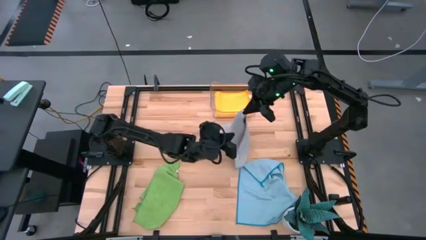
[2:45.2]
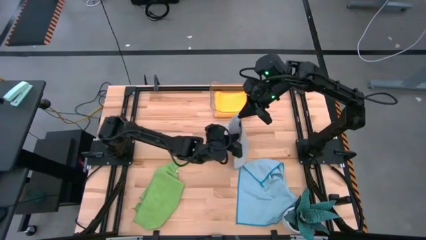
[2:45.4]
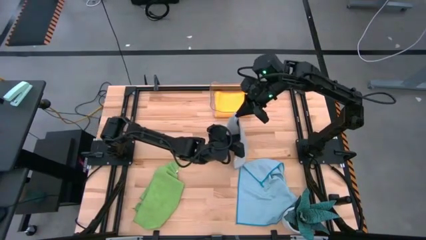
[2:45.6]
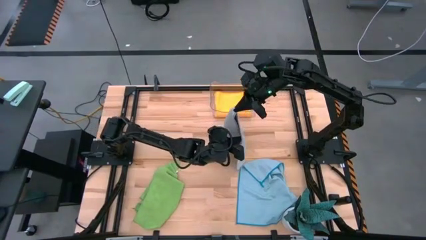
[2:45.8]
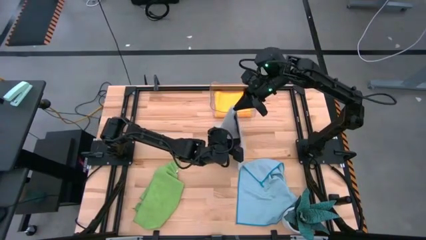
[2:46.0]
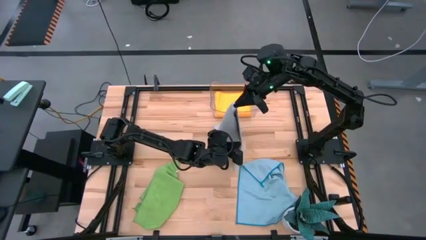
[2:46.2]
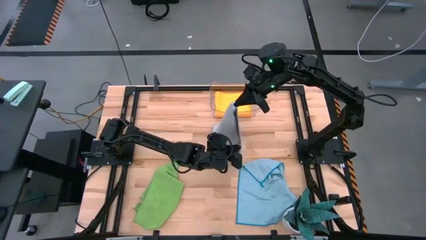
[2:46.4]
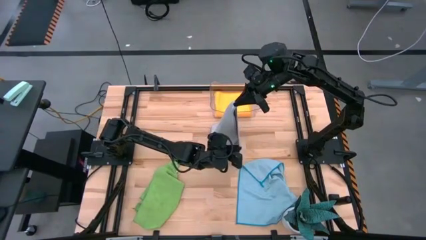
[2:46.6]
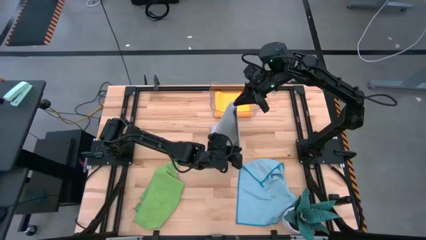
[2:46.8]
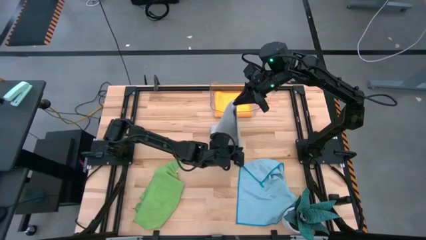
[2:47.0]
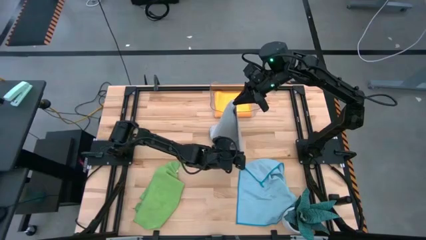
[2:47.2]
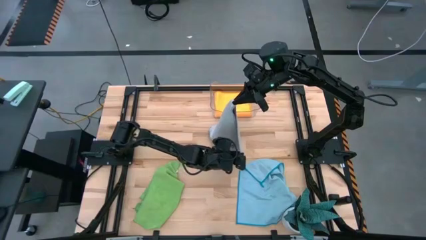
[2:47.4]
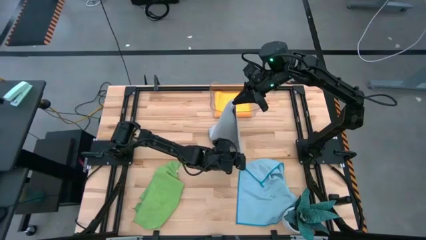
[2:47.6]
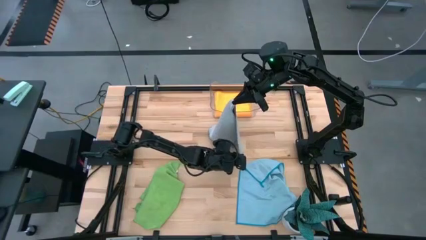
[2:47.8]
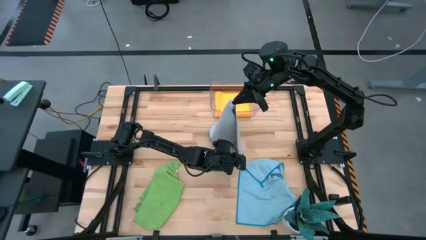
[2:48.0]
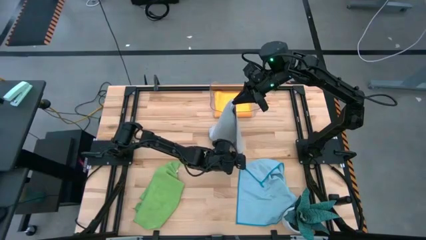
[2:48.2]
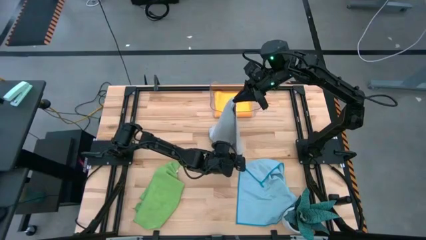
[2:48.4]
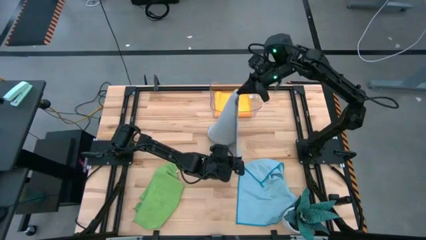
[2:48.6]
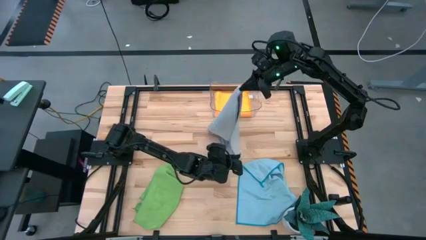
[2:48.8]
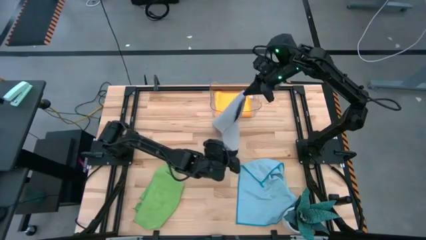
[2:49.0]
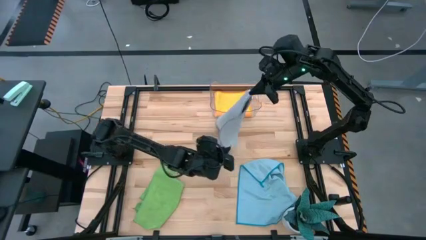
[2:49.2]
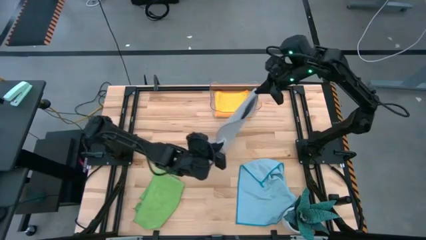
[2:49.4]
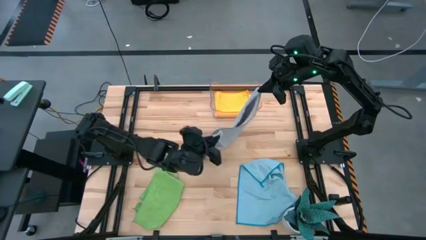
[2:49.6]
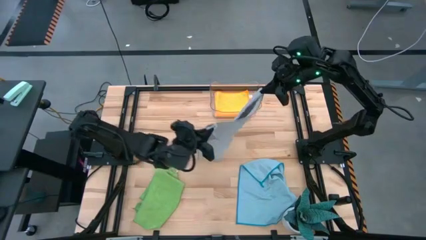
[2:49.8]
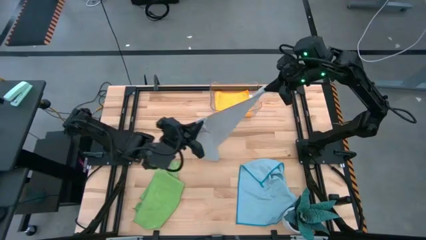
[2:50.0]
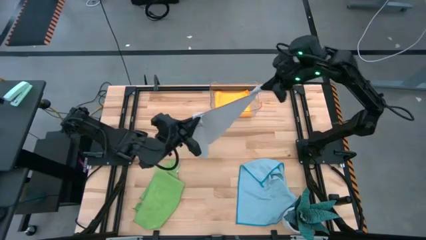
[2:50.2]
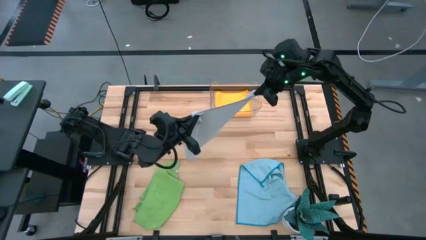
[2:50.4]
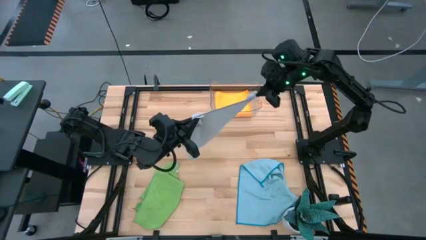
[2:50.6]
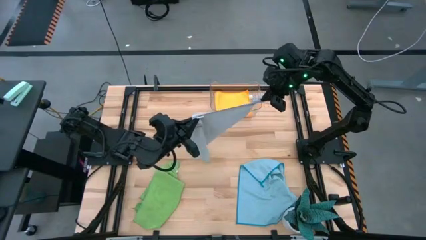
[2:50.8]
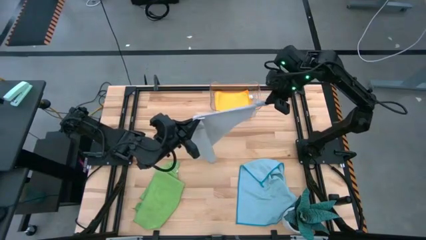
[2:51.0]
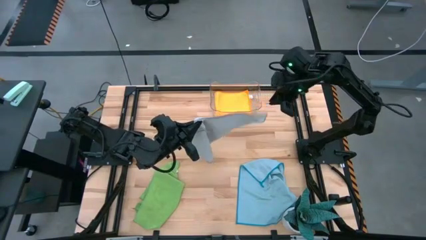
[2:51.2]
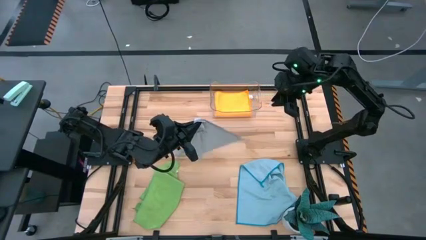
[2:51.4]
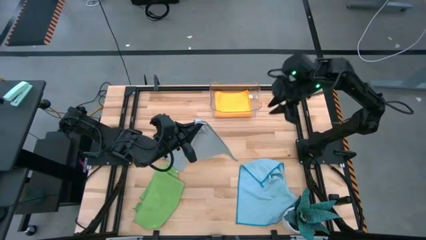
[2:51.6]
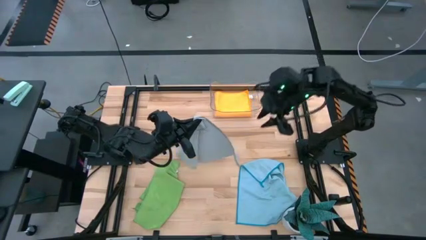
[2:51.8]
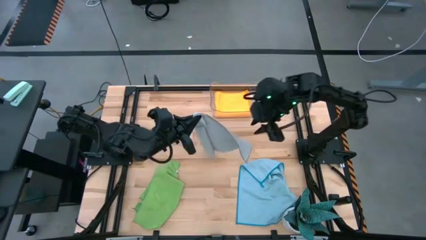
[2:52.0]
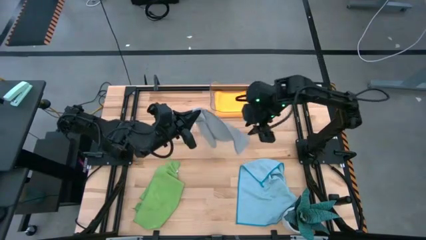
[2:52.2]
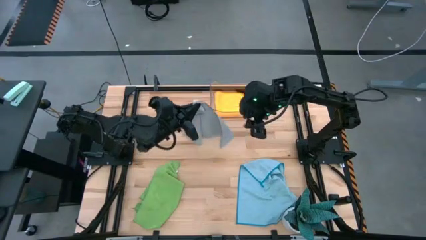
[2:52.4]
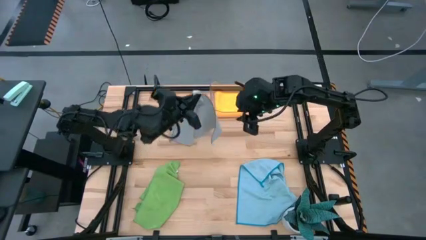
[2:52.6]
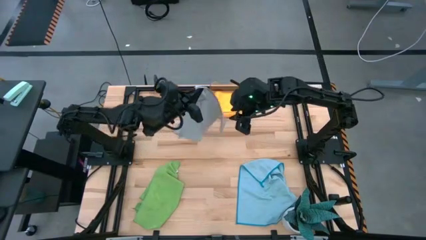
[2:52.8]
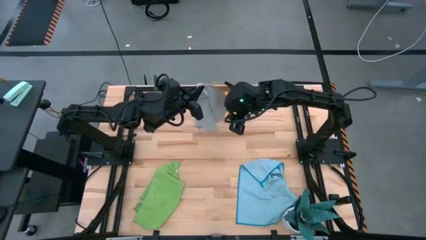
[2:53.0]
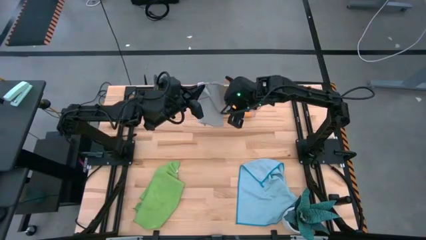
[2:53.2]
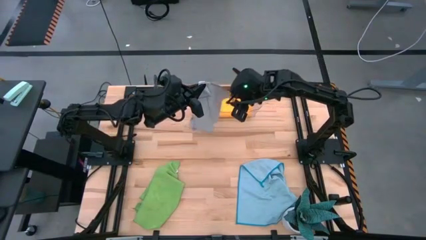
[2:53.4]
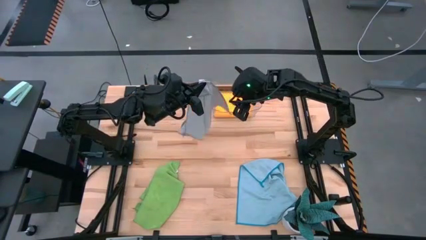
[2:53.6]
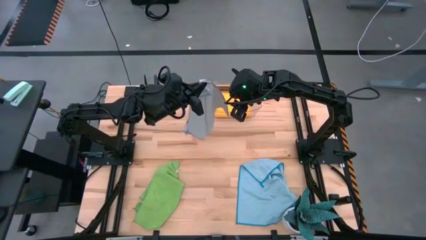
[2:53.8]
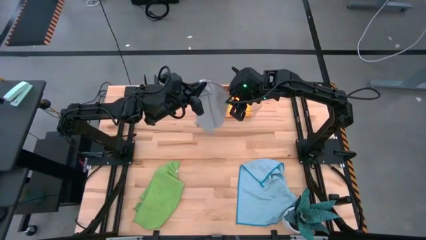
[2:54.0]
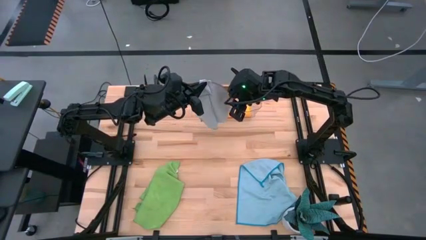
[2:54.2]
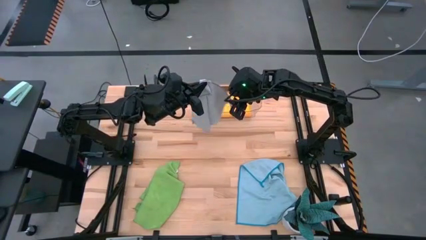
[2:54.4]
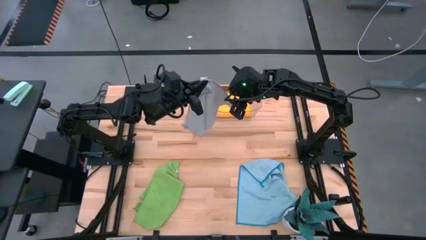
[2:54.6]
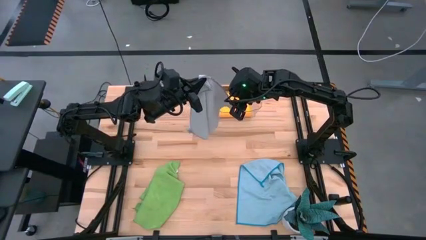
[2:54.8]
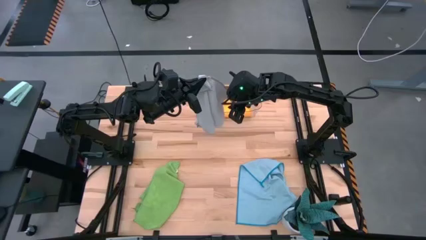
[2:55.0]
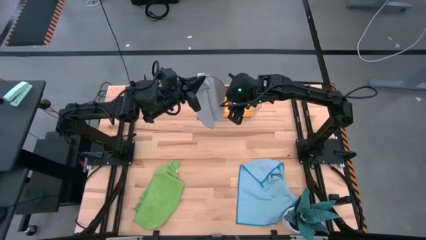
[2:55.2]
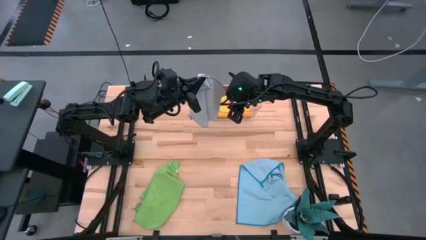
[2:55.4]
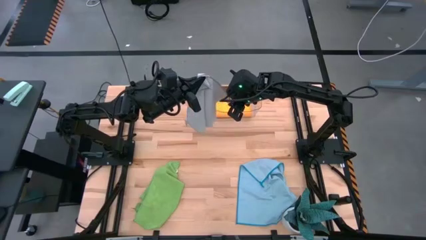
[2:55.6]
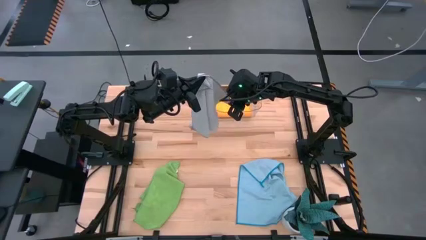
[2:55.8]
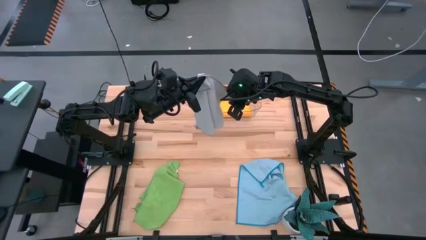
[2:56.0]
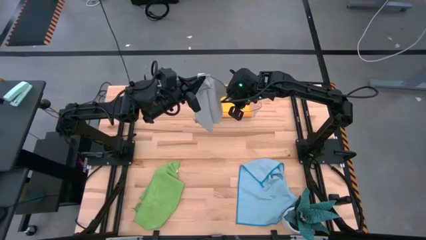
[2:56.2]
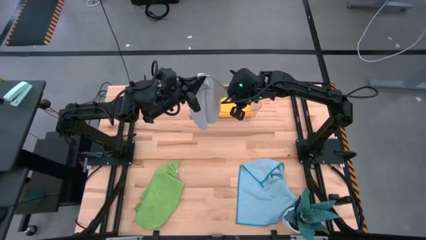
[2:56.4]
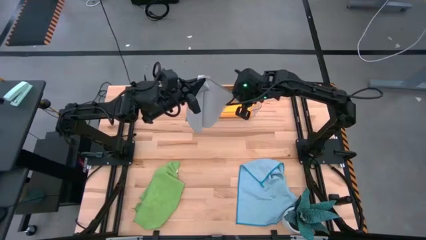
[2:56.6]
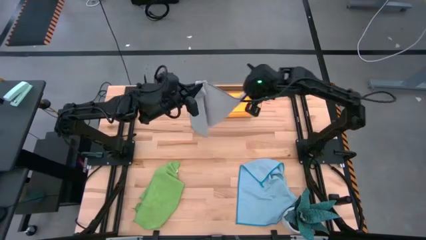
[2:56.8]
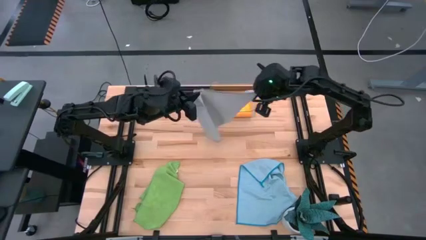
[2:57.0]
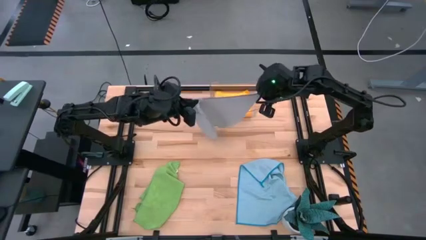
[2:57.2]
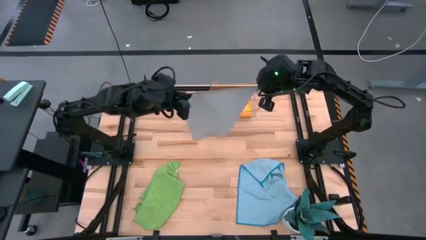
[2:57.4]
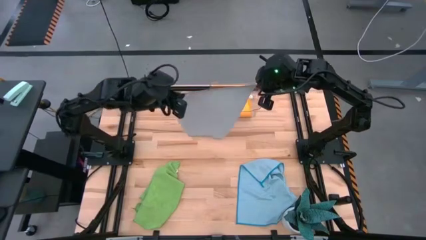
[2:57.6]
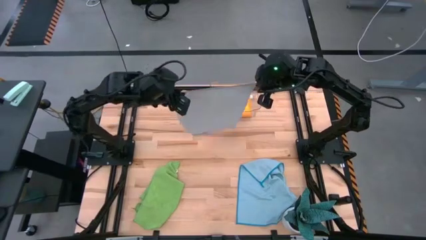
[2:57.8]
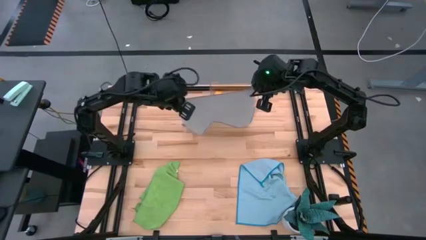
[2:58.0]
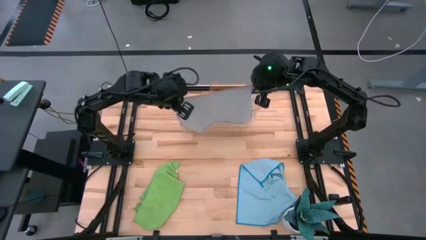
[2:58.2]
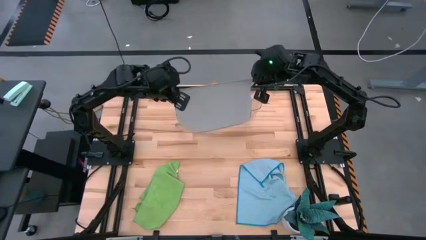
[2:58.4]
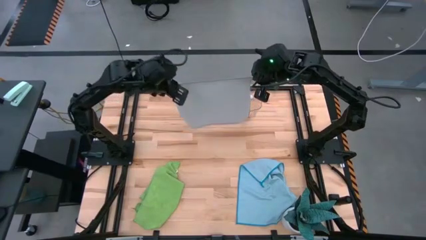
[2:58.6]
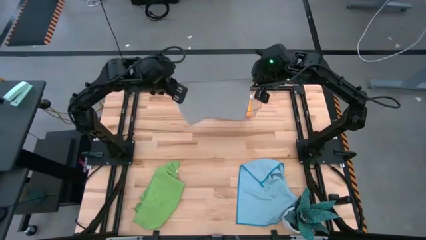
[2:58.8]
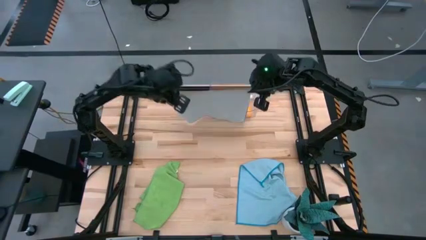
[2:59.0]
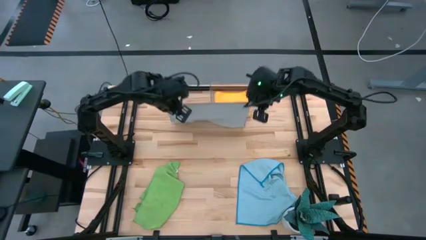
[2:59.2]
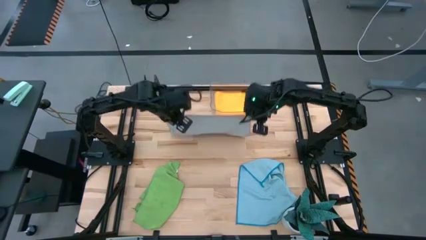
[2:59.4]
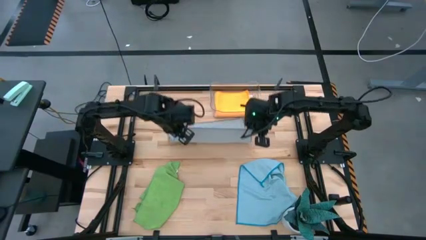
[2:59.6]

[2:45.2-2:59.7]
Task: Fold microfiber towels
Fold the gray microfiber cloth
